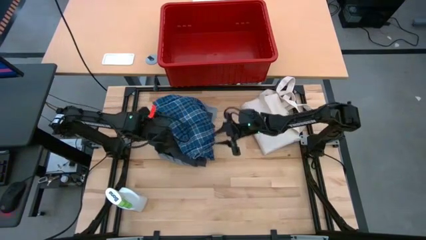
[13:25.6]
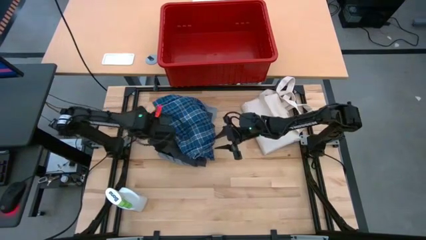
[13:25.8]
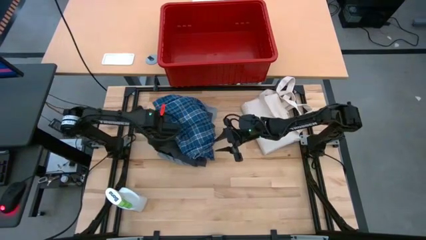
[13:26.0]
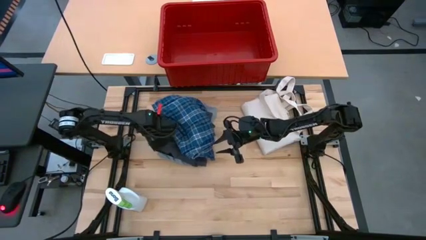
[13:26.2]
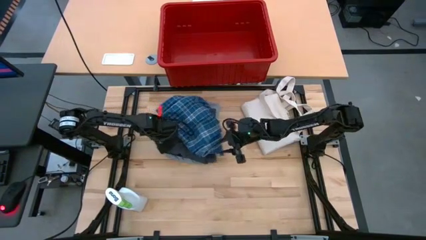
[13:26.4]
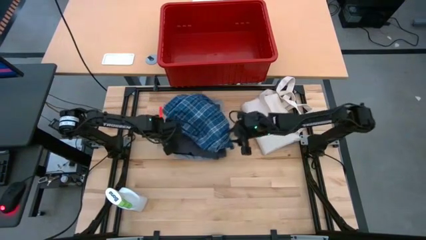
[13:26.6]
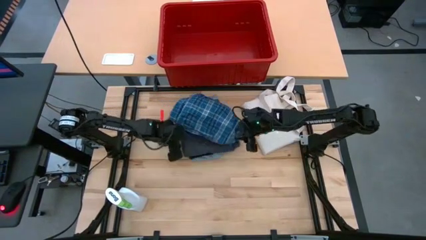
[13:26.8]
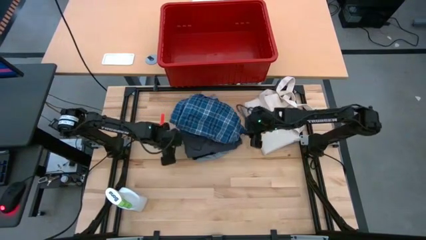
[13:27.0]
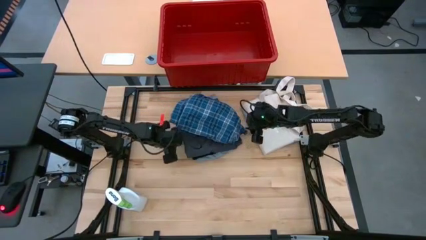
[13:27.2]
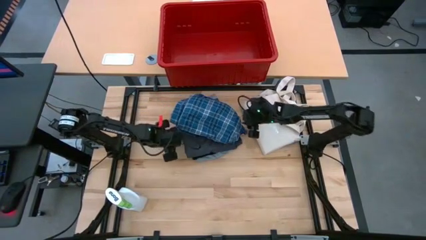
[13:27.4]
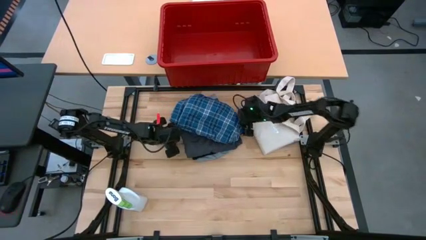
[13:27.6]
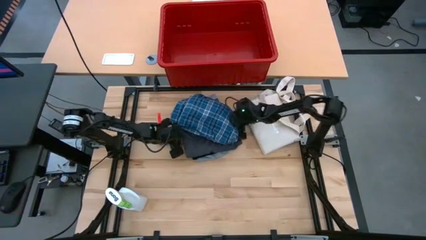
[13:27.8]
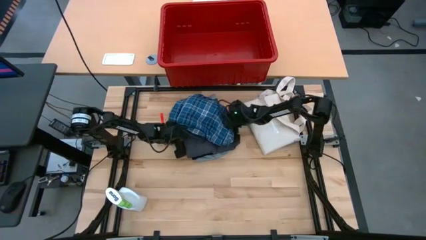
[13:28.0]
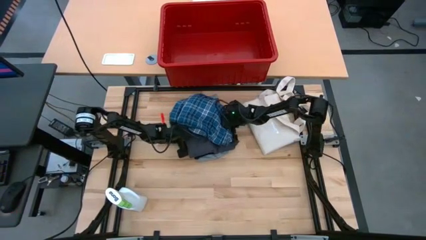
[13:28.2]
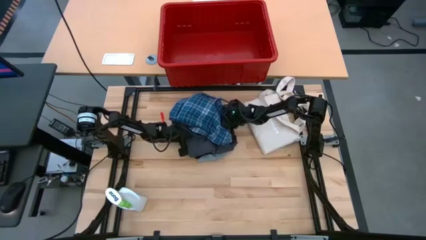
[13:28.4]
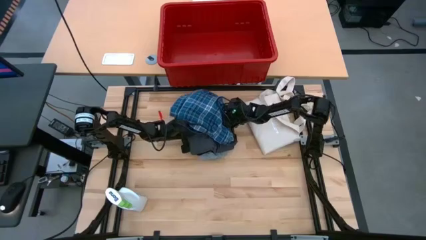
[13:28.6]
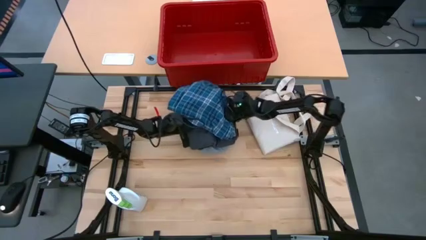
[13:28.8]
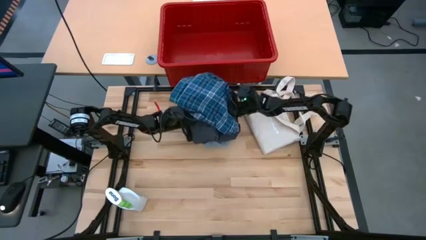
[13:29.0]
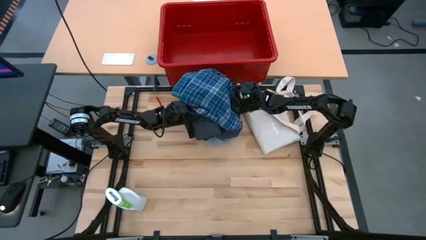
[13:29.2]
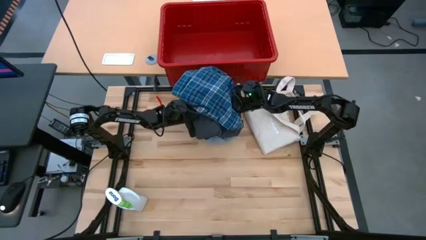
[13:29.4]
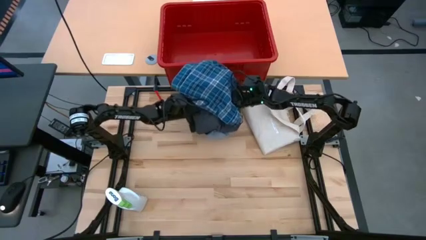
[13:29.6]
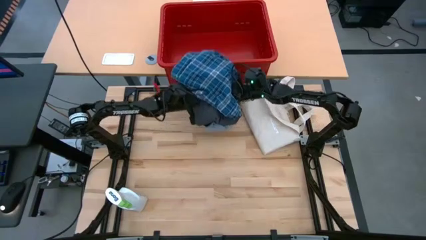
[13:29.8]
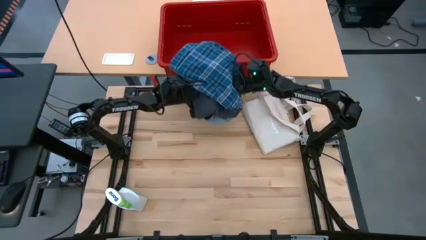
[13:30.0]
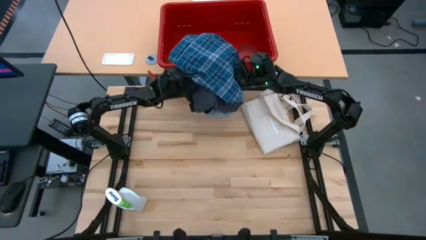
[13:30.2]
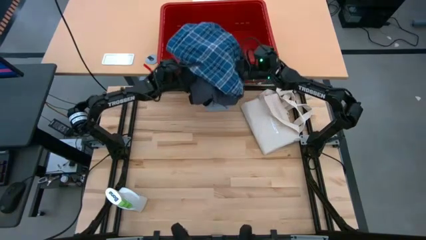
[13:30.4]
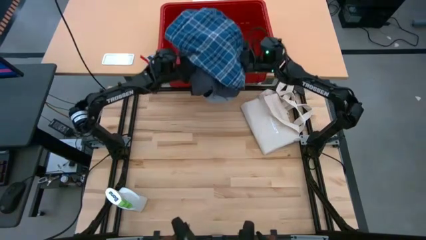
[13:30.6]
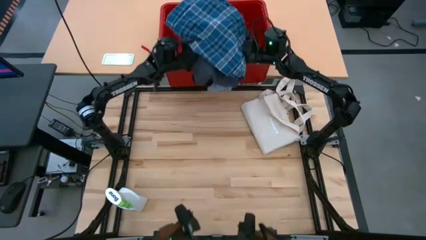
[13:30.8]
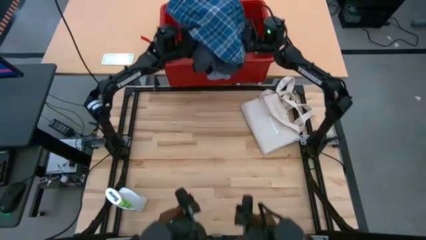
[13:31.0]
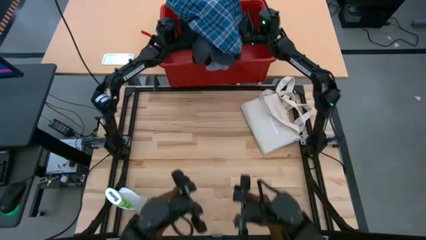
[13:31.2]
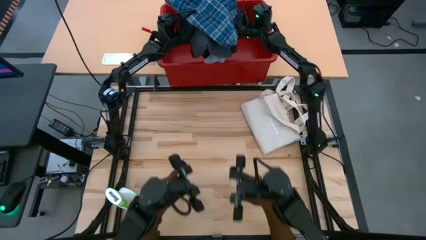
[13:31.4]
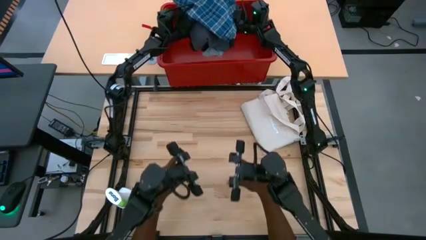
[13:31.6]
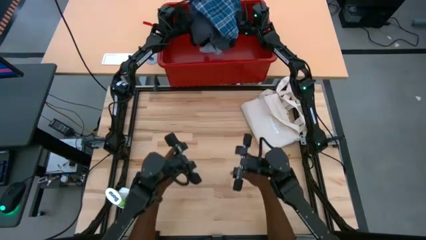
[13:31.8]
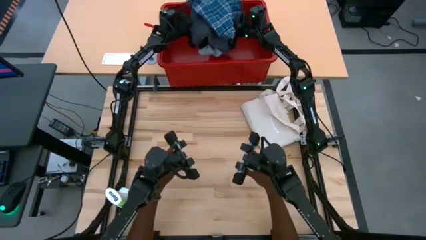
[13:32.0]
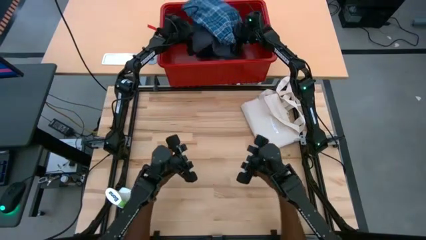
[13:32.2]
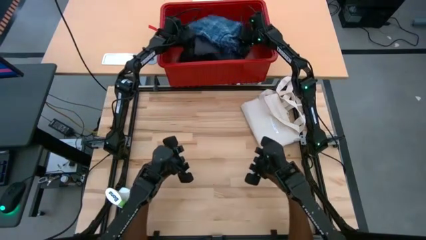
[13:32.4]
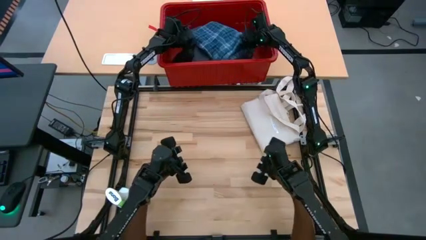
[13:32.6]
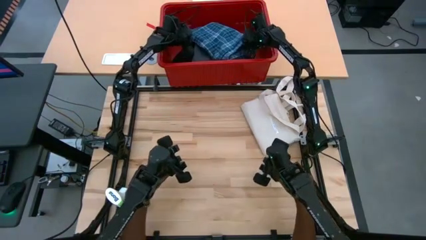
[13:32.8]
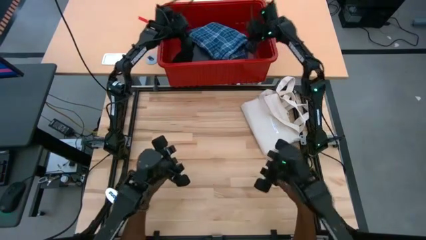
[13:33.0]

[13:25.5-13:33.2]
Task: Fold Laundry from Bin
Put clothes including shirts and shorts into the red laundry organizer

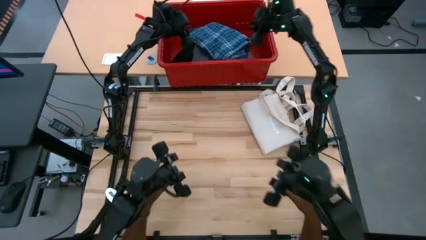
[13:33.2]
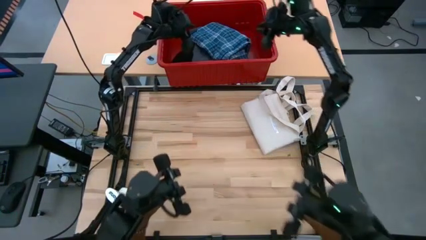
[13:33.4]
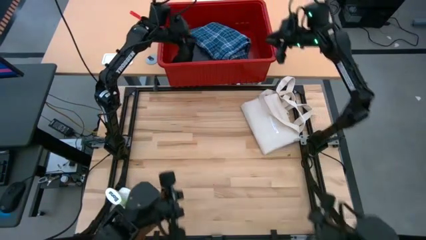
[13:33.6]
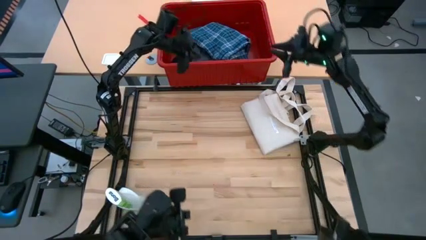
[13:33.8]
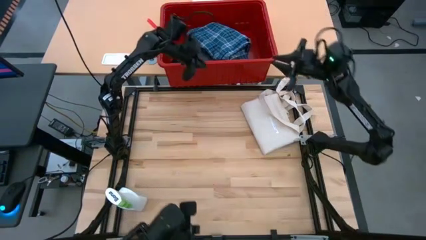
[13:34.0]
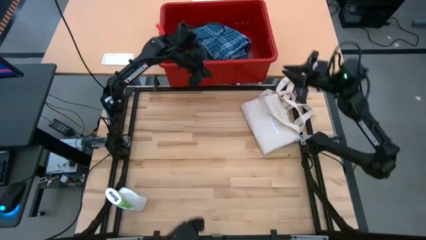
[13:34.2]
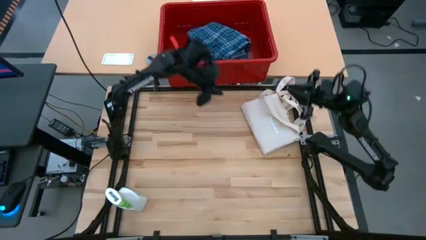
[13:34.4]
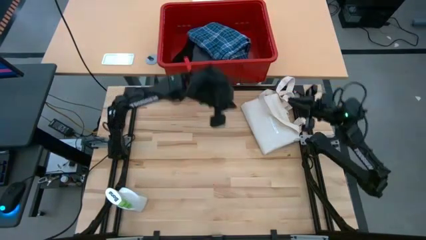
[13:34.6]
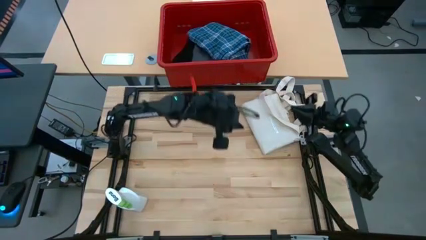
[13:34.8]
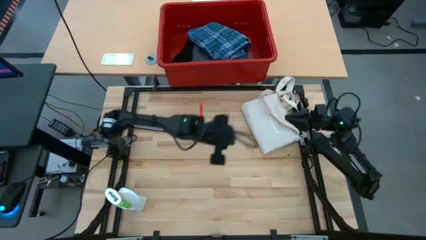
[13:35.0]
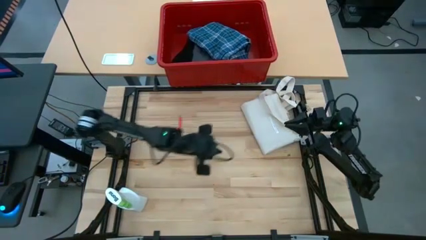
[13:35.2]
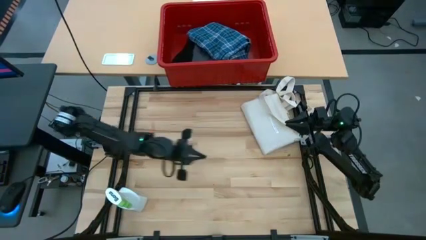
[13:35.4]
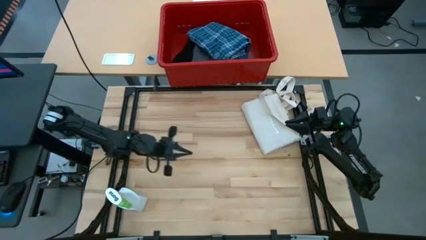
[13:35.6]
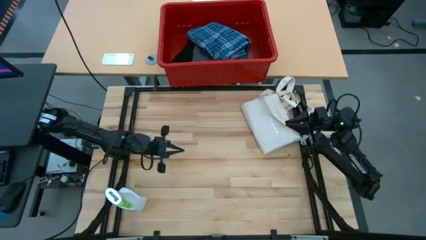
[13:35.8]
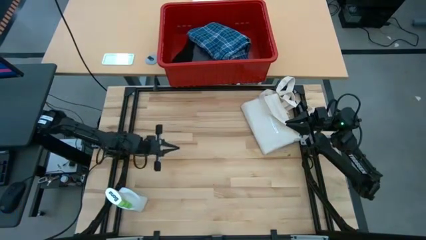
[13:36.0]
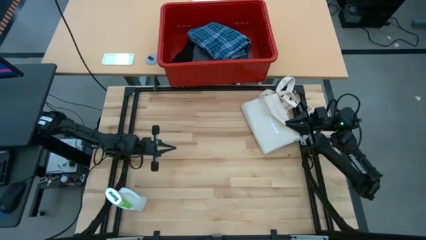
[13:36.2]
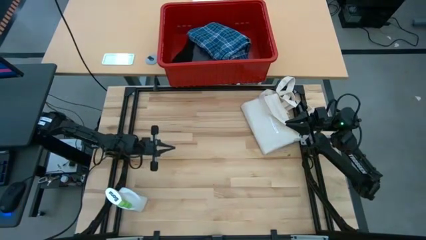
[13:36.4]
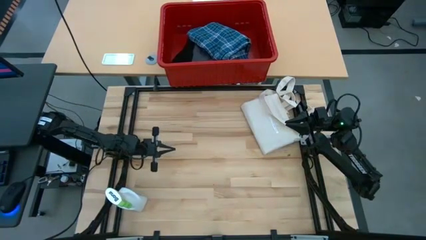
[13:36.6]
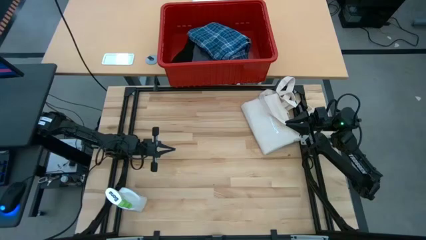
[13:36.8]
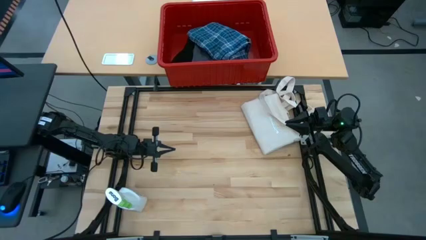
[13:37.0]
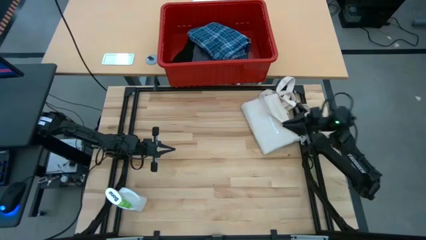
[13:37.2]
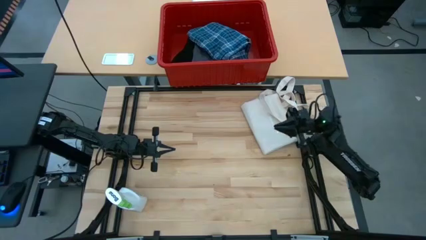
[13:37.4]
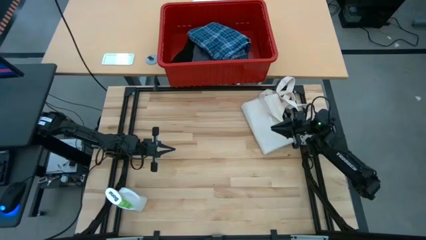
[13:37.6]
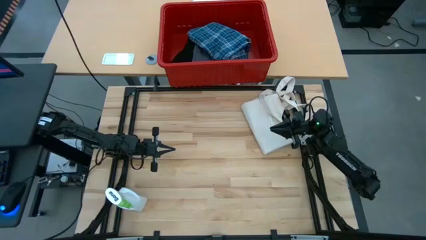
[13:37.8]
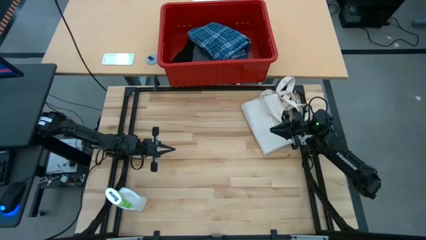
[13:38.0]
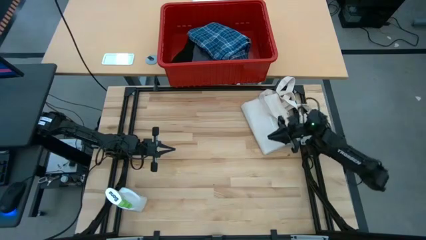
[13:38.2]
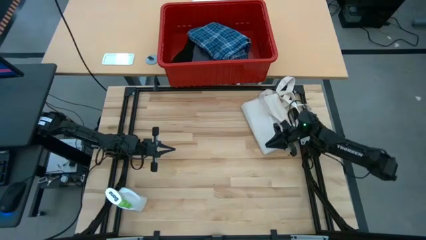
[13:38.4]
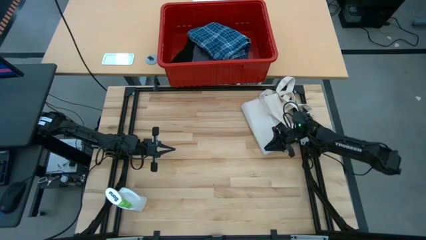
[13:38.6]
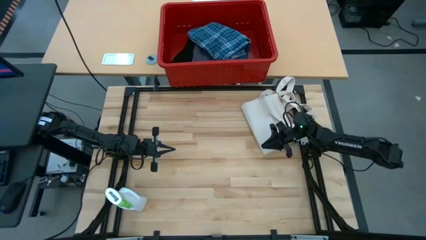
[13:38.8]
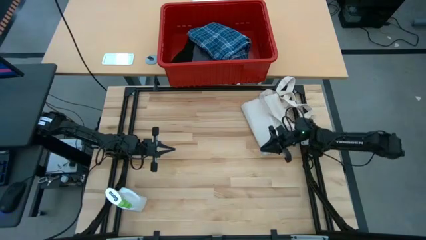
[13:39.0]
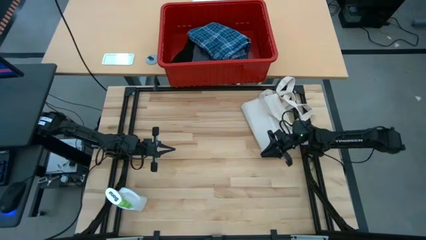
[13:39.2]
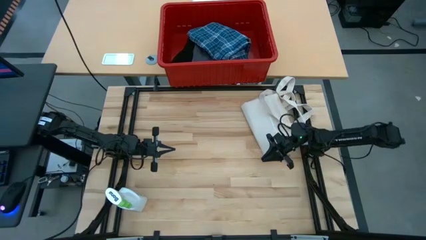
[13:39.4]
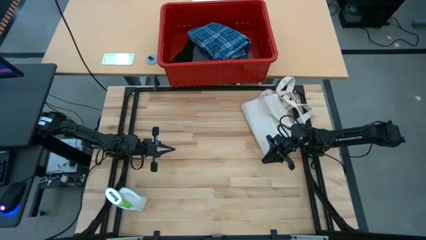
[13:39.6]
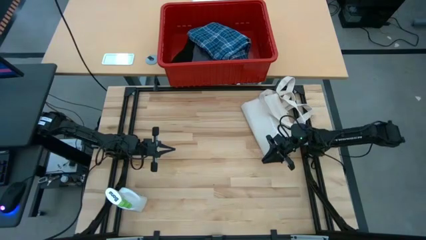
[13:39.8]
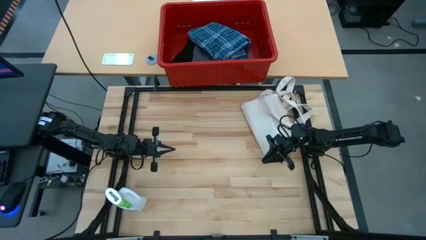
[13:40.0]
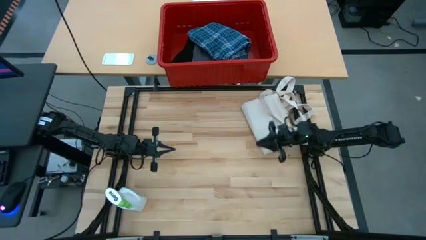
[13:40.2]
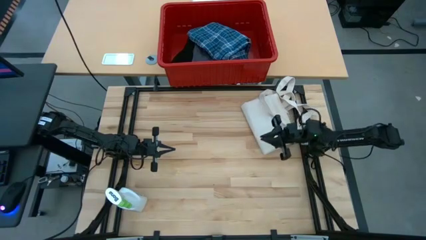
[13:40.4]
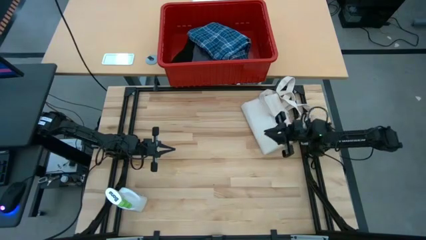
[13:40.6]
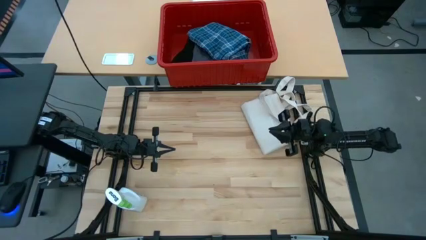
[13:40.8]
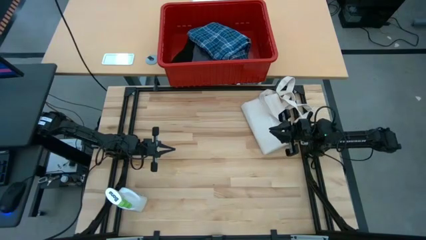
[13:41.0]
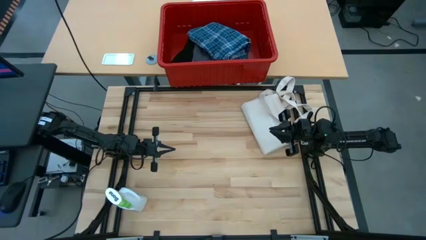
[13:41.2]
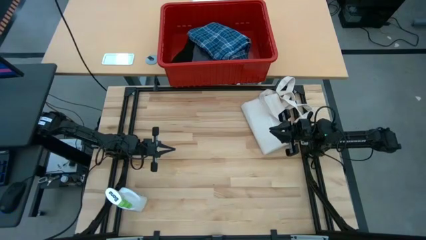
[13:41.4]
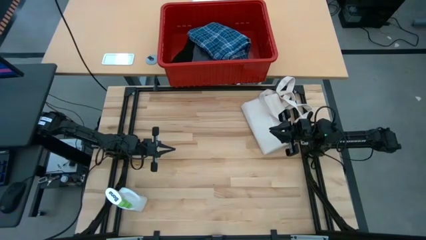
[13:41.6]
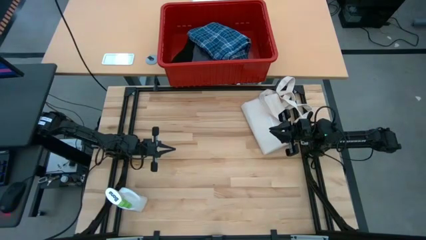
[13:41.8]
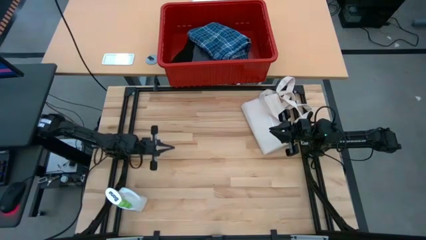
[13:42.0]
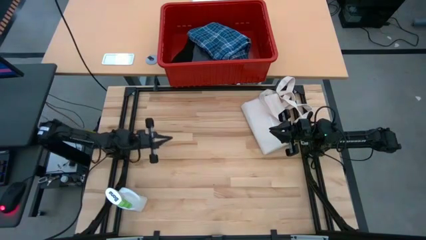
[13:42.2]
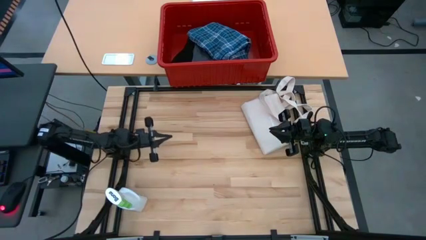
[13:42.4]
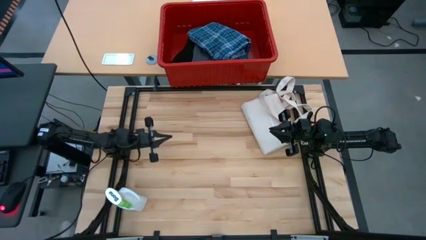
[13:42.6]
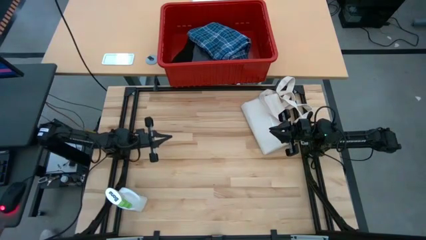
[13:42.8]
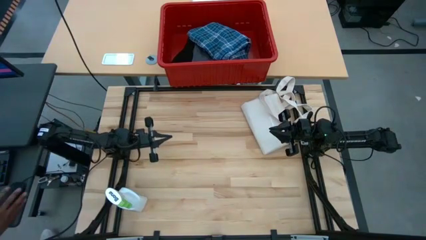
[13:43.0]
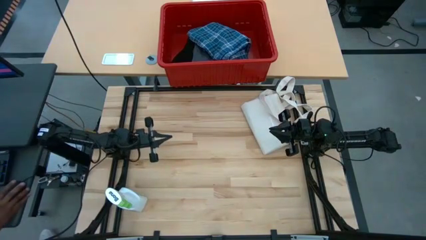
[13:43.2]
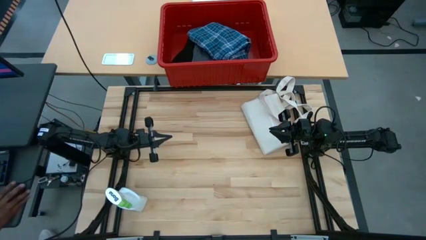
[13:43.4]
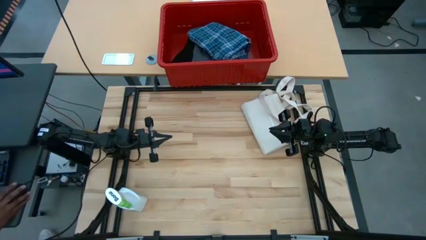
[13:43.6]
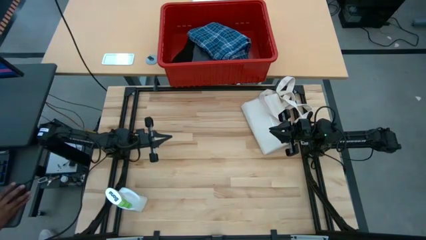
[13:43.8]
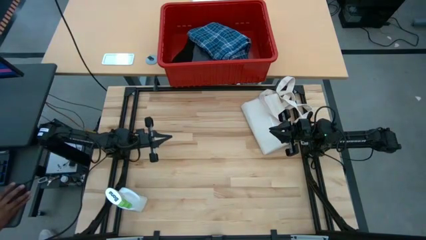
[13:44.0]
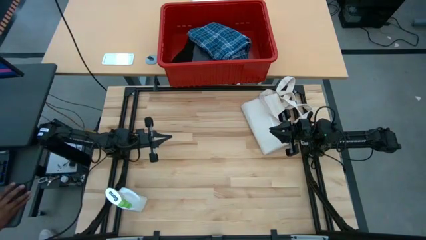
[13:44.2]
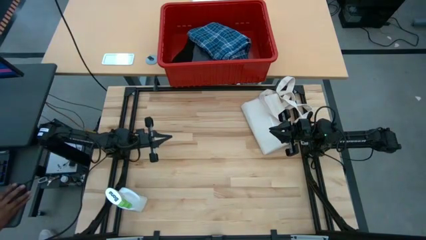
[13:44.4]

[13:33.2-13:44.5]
Return to Home Position
